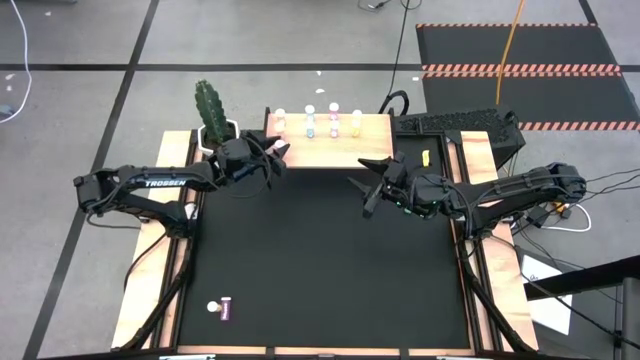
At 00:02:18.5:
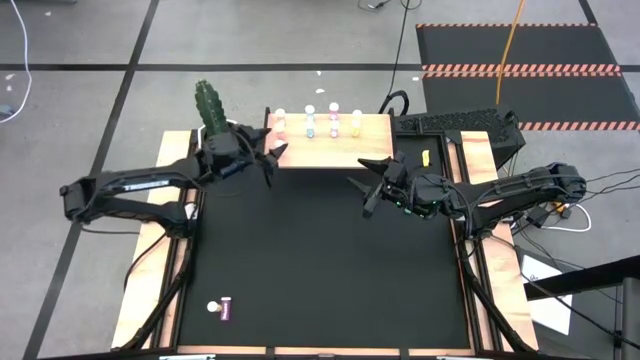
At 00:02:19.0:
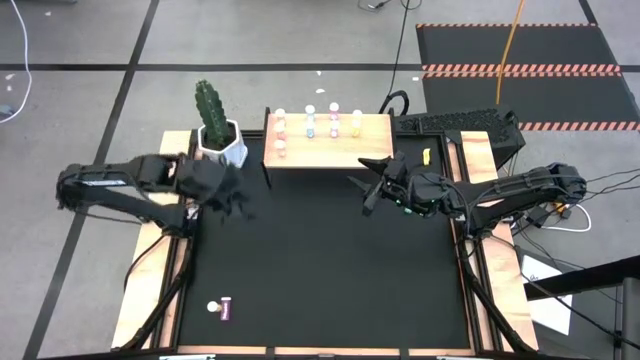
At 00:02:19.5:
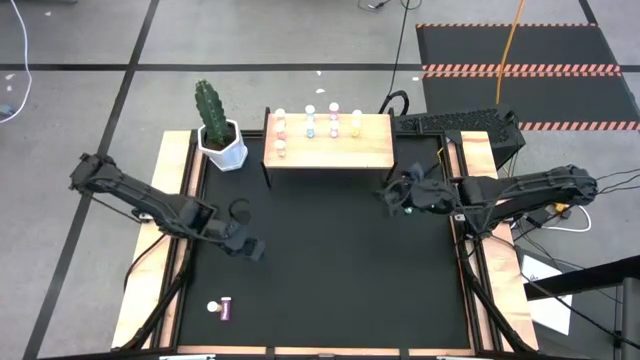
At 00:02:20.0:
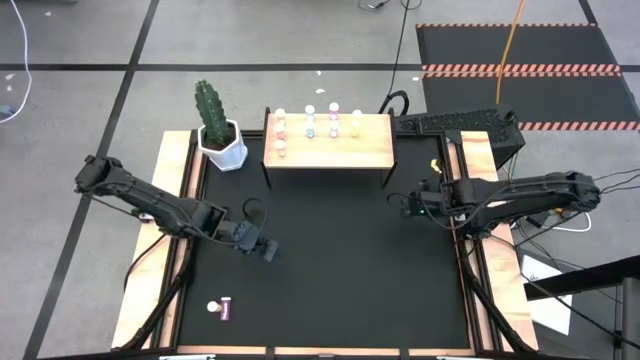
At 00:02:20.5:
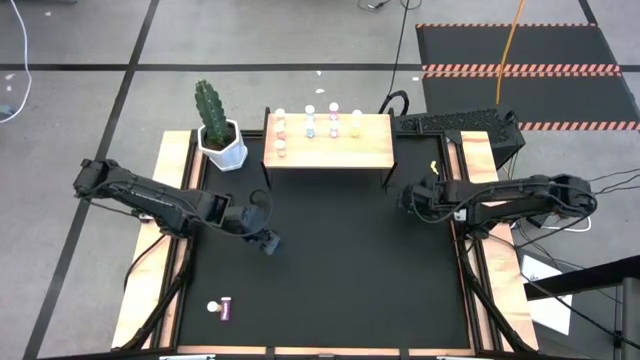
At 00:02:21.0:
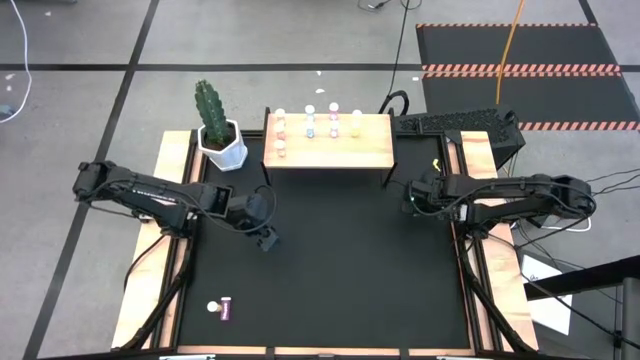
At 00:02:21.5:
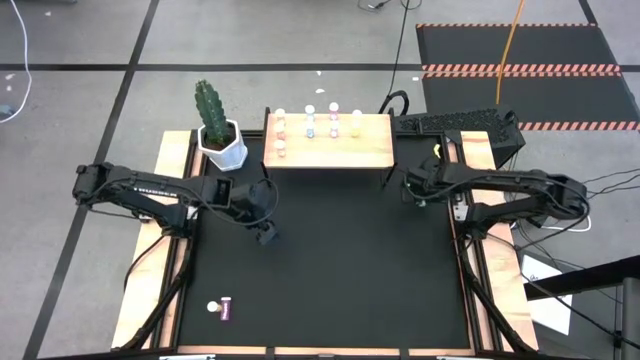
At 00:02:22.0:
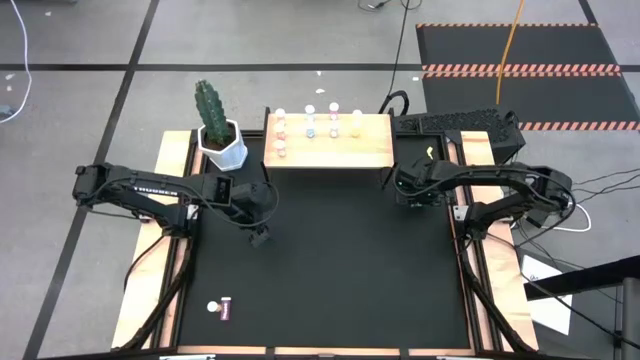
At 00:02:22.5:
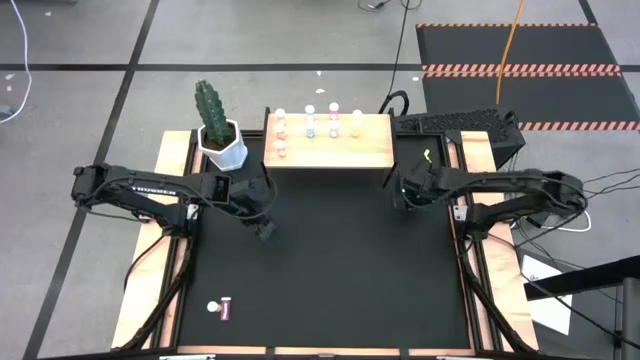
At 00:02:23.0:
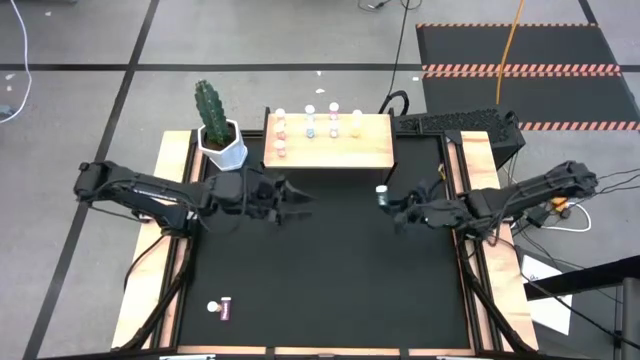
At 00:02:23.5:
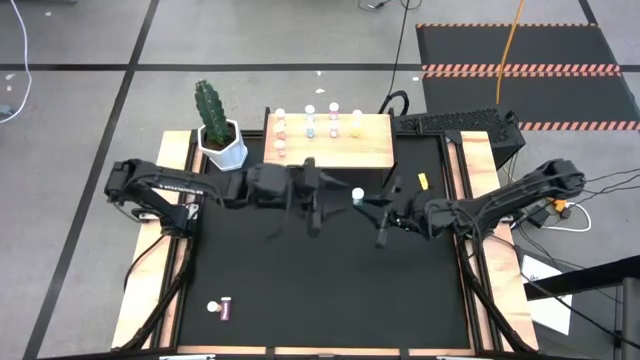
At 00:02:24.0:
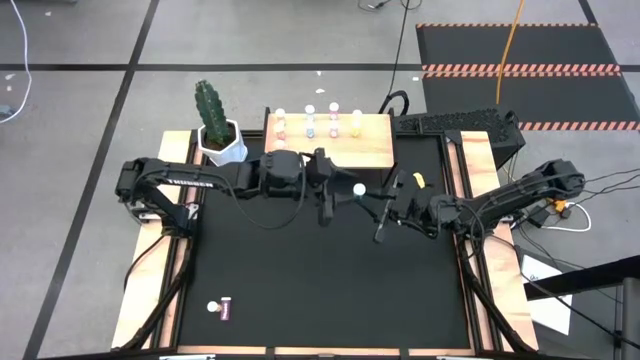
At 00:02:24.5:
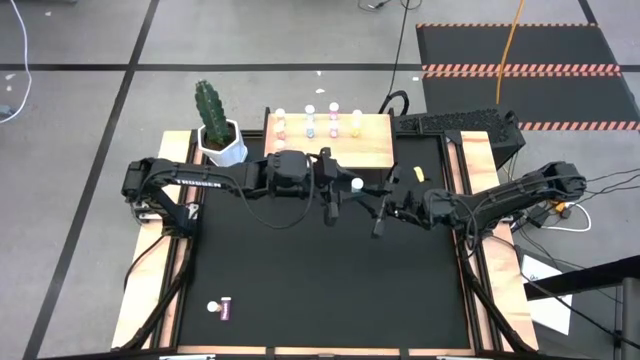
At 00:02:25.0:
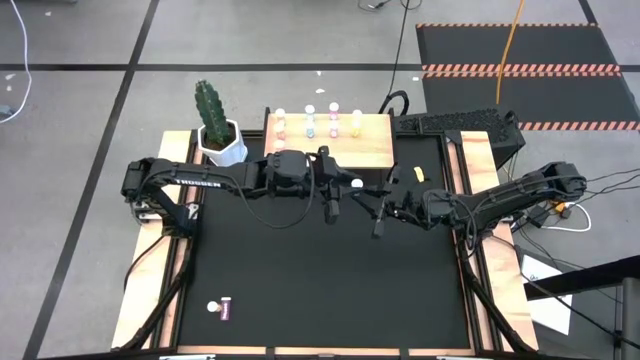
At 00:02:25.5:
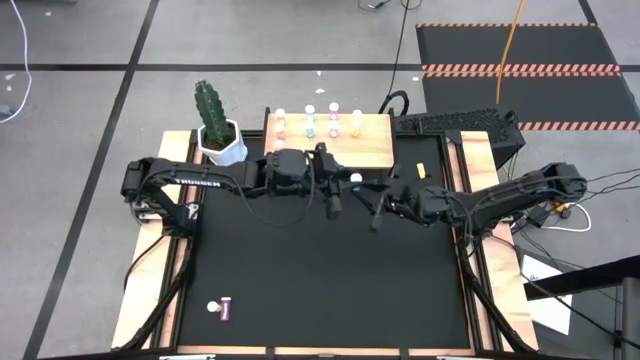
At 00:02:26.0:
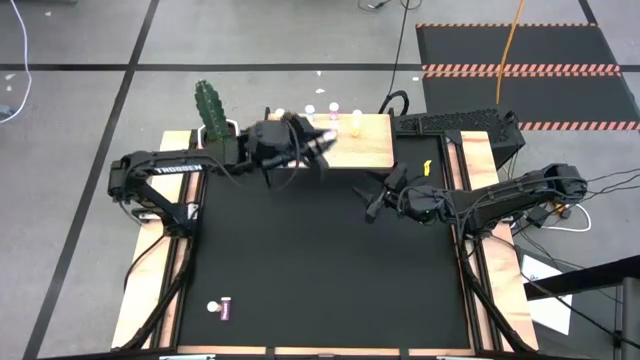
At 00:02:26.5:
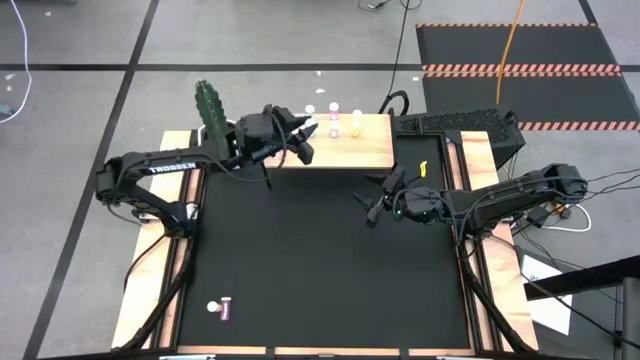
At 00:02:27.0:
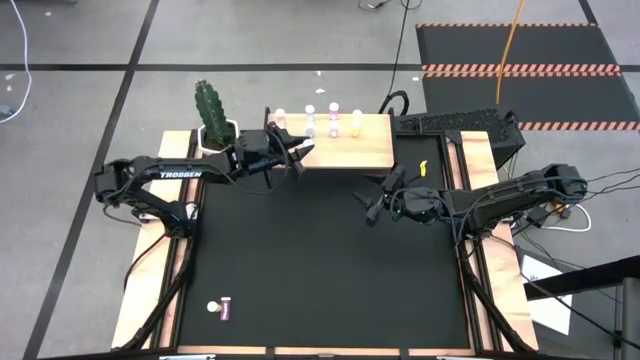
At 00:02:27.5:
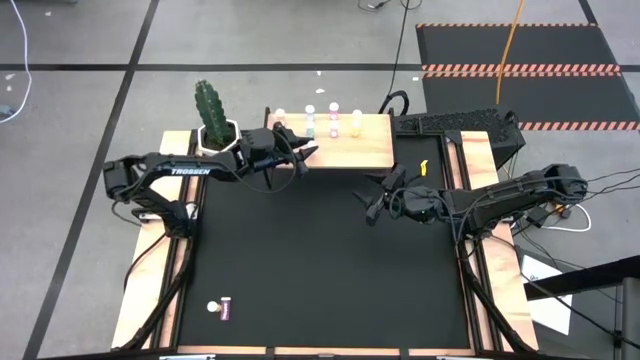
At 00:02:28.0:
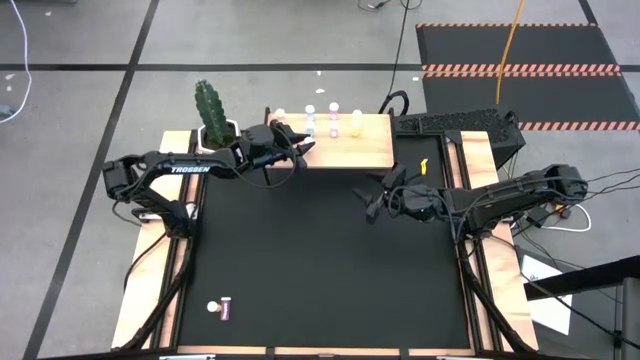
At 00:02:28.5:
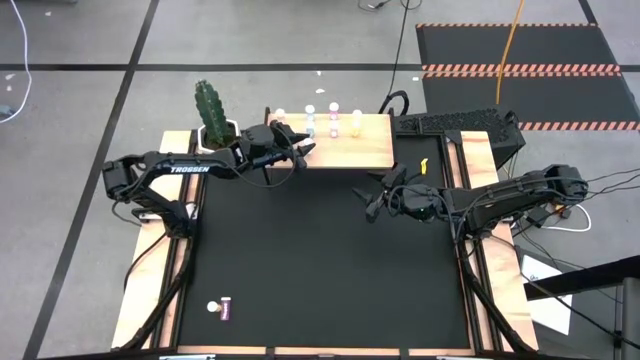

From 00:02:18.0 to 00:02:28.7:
Task: Pick and place medicine bottles onto shelf by color
Put the blue pill bottle aligned with the other blue pill bottles on the shelf

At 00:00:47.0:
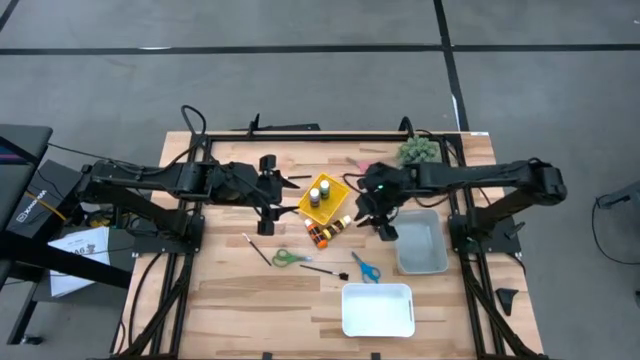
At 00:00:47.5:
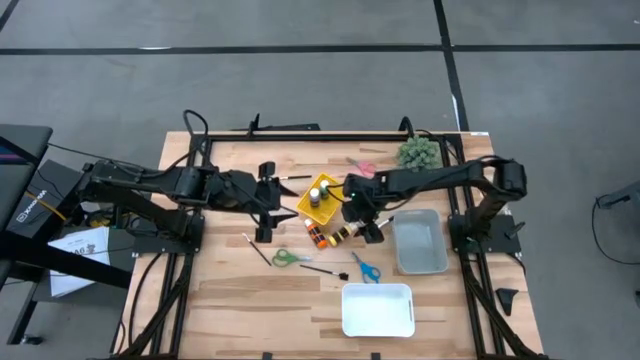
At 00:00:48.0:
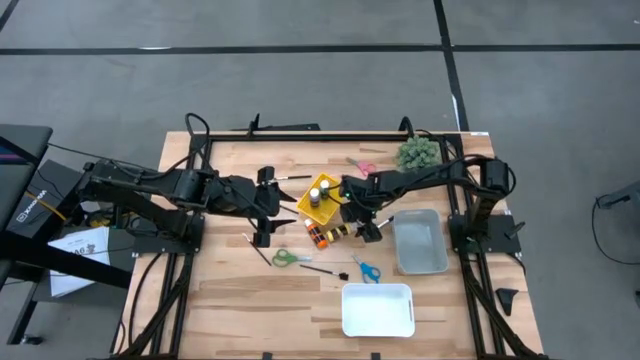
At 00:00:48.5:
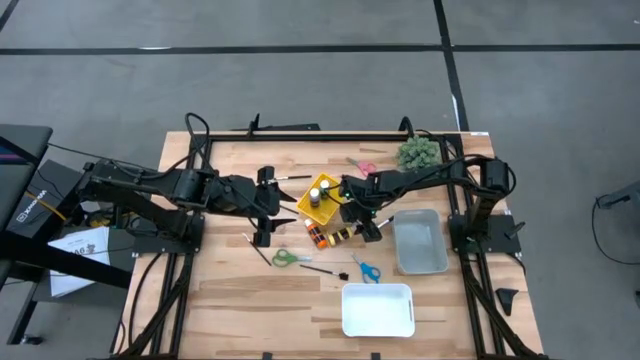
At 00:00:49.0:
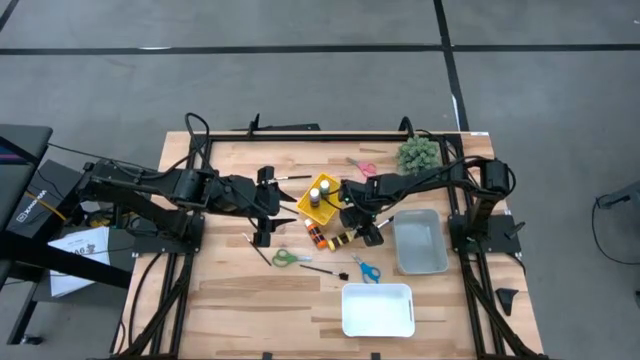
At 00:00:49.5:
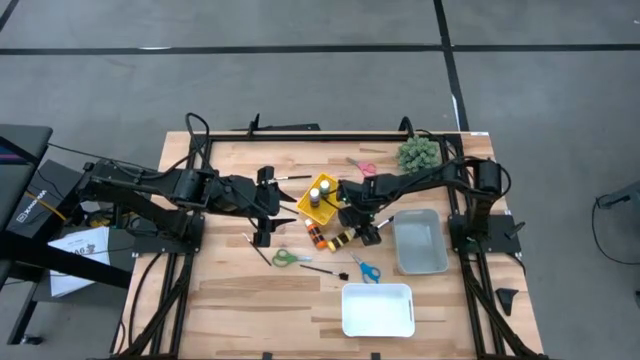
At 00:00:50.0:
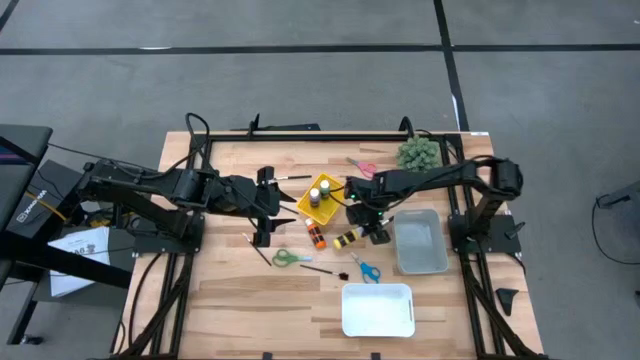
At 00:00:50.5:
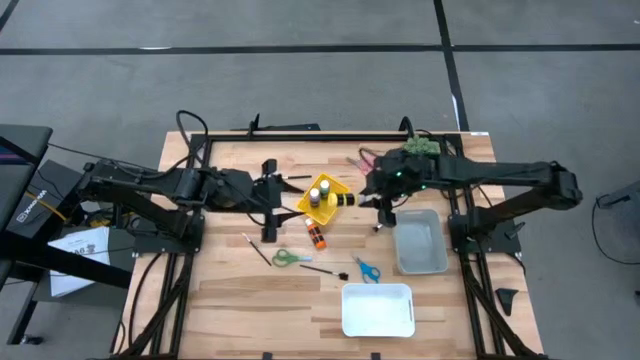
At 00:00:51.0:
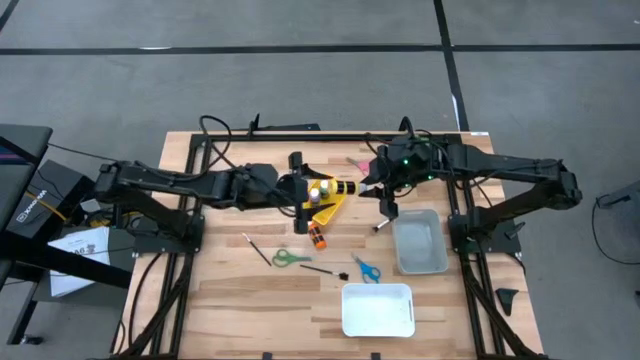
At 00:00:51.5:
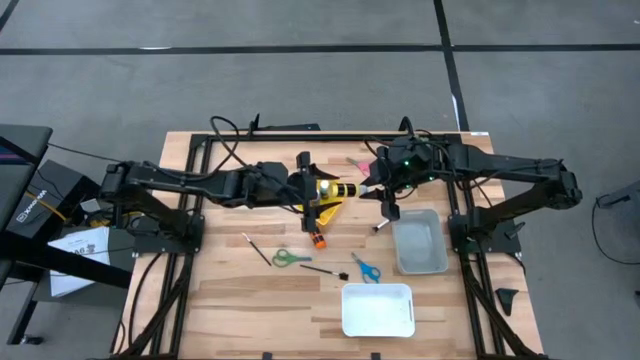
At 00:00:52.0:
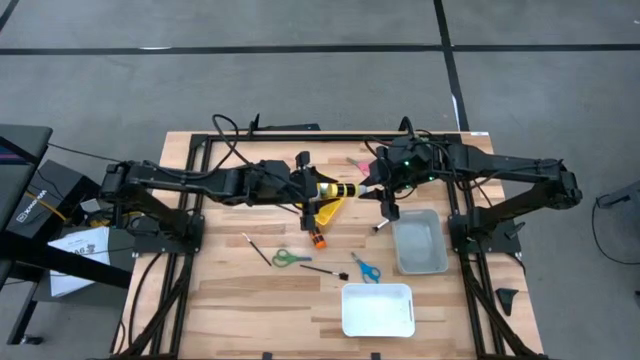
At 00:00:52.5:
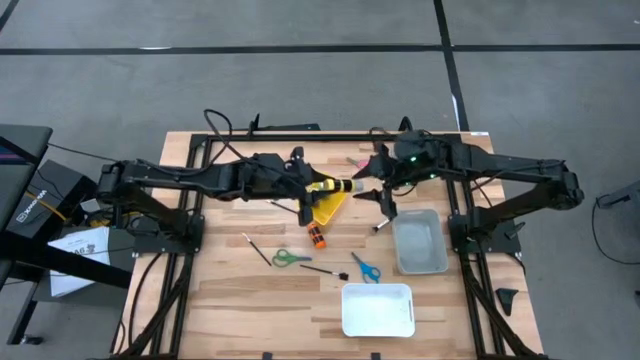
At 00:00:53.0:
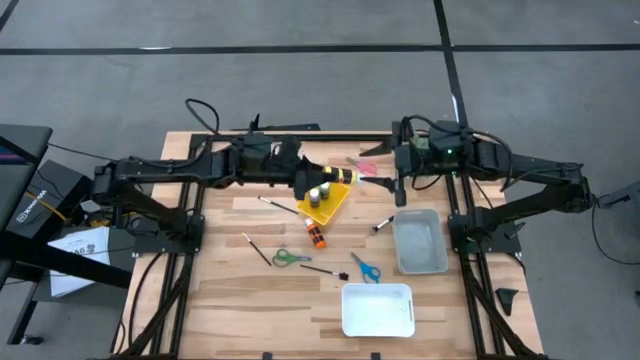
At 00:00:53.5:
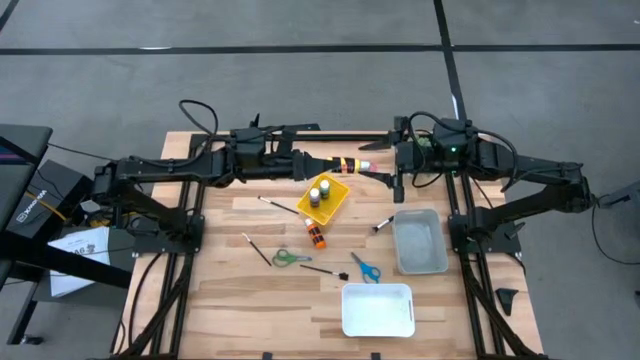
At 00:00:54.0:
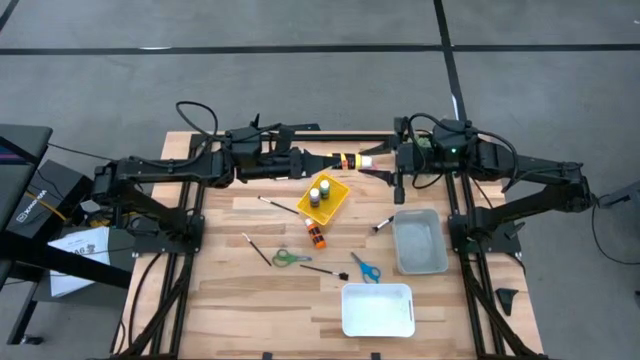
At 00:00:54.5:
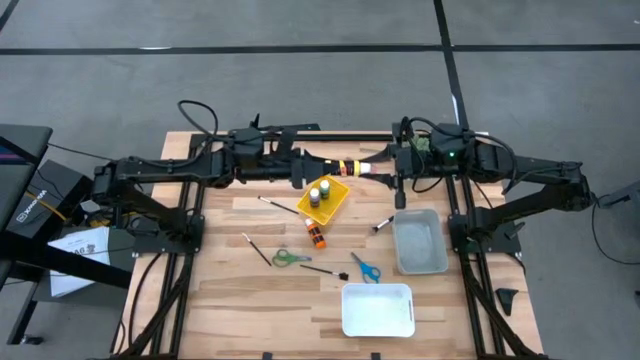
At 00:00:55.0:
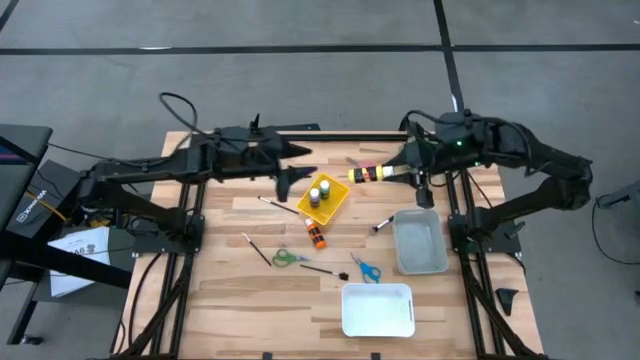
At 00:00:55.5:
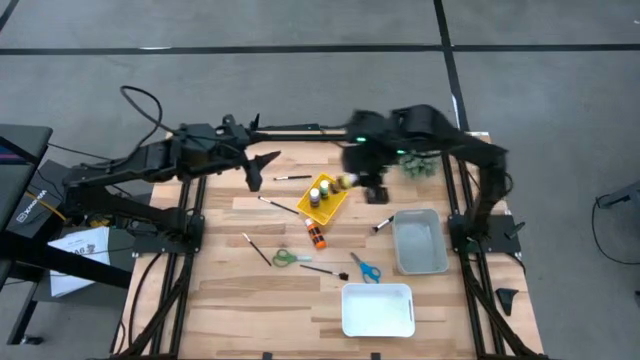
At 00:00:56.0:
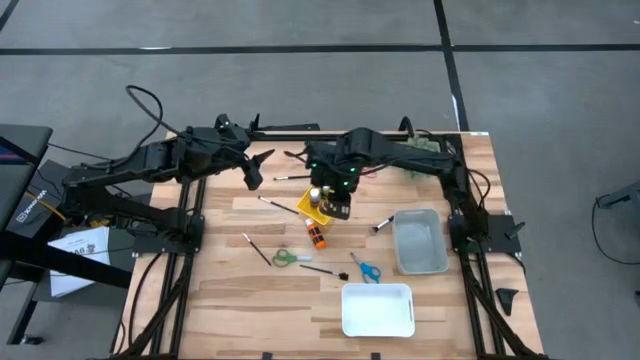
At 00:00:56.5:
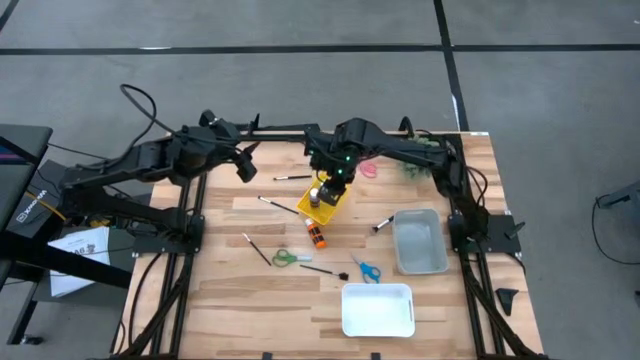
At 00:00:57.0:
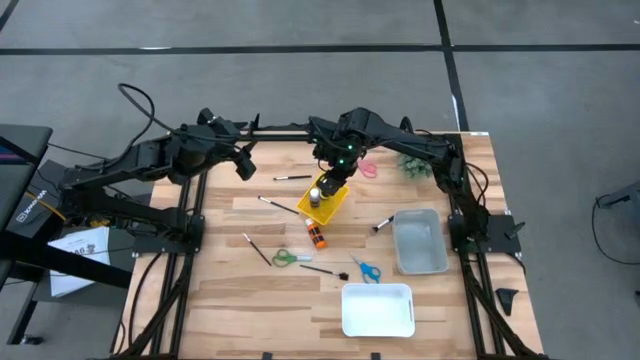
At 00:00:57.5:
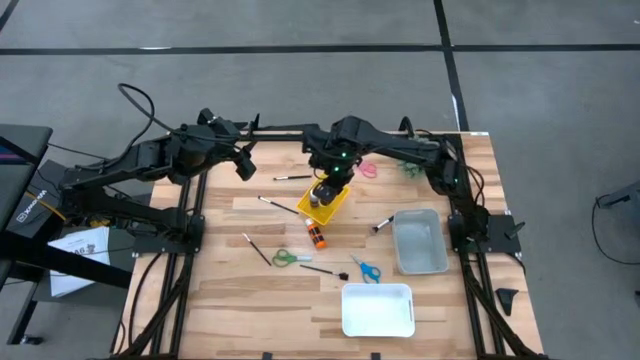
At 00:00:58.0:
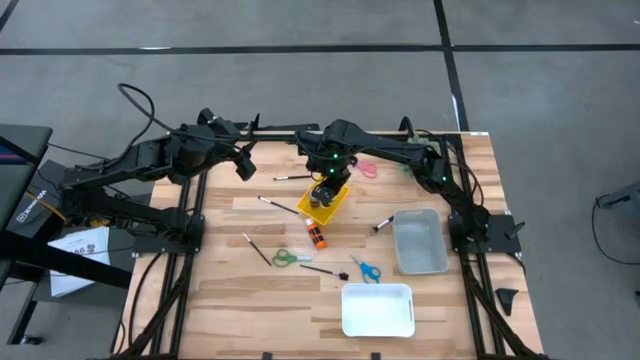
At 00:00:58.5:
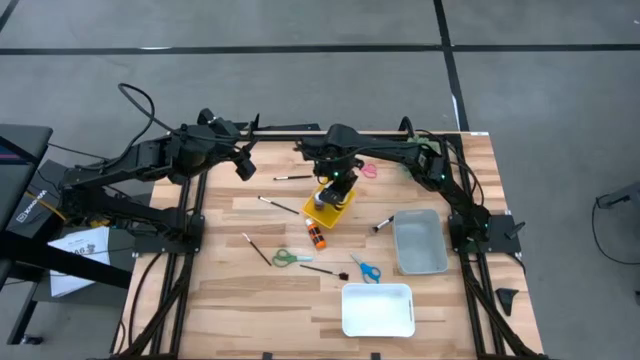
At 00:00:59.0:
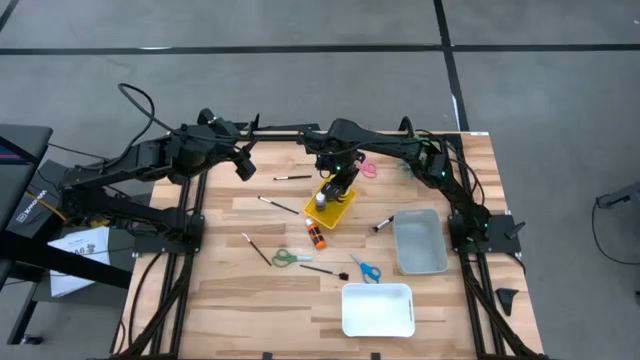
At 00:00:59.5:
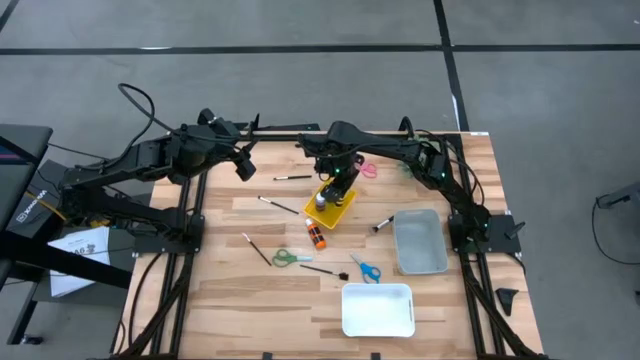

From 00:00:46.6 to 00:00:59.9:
Task: Pick & Place Paint Supplies
Put the yellow paint bottle into the yellow bin
